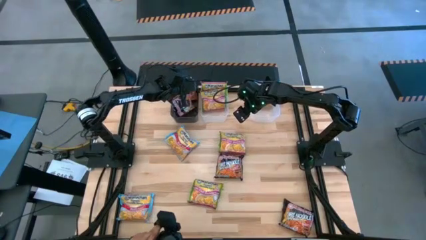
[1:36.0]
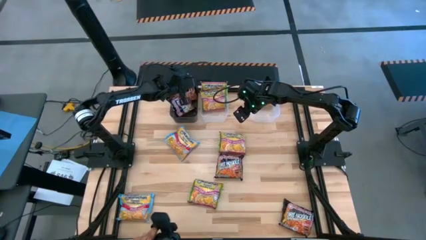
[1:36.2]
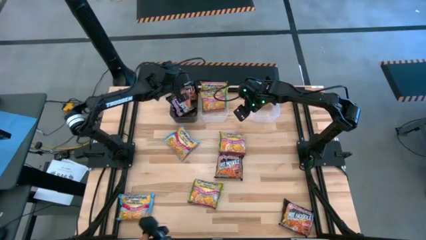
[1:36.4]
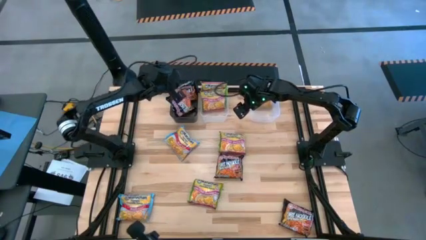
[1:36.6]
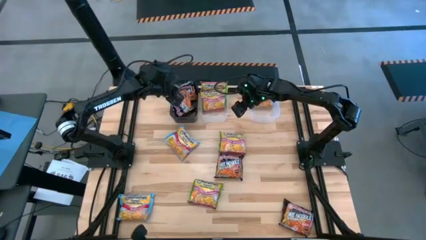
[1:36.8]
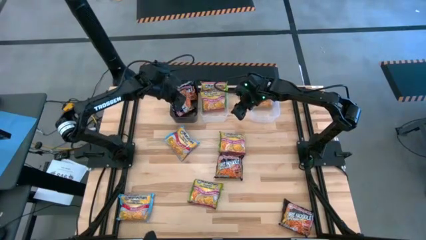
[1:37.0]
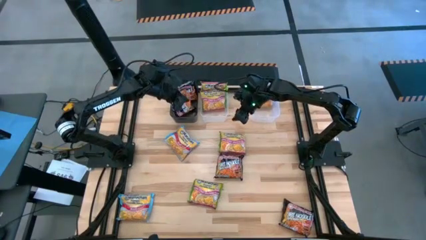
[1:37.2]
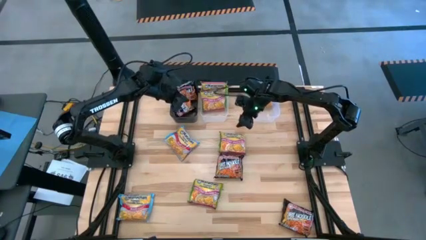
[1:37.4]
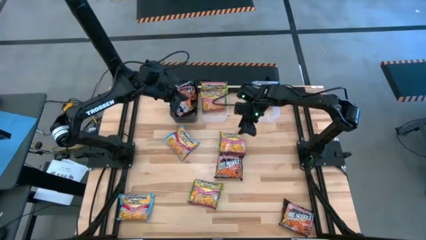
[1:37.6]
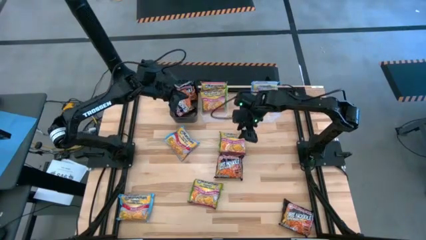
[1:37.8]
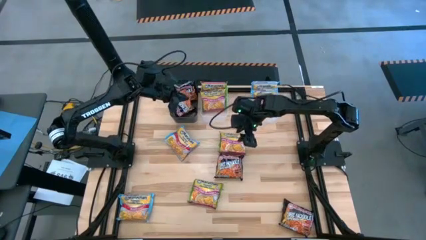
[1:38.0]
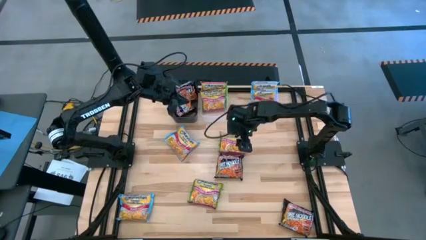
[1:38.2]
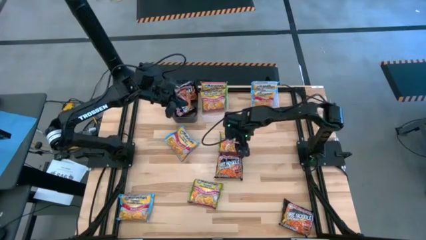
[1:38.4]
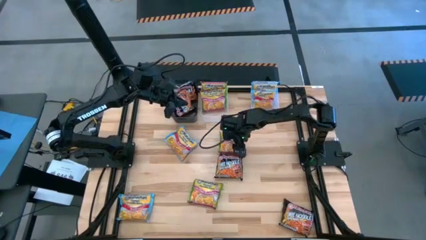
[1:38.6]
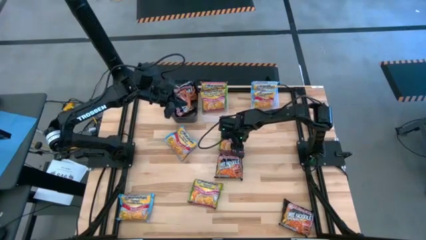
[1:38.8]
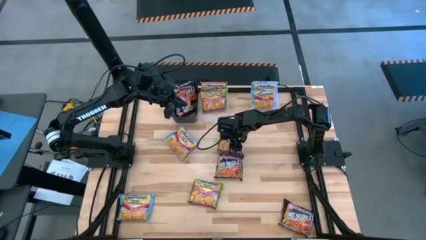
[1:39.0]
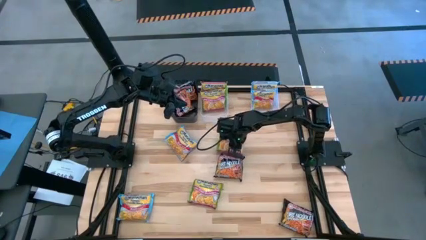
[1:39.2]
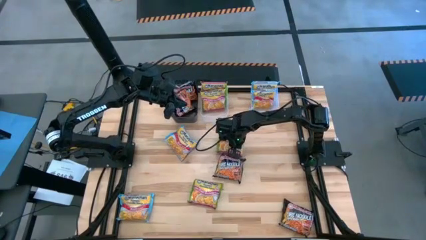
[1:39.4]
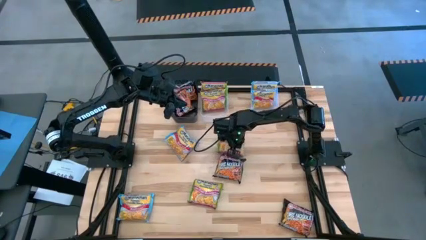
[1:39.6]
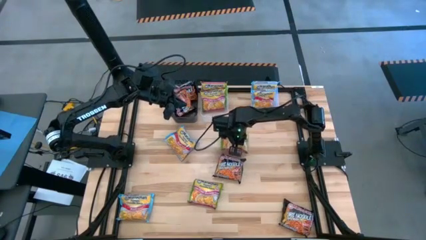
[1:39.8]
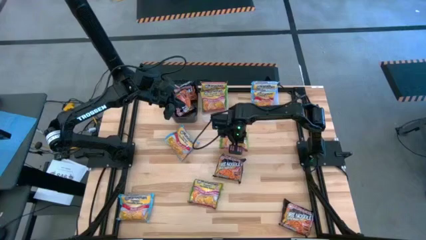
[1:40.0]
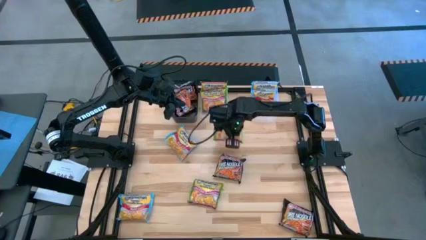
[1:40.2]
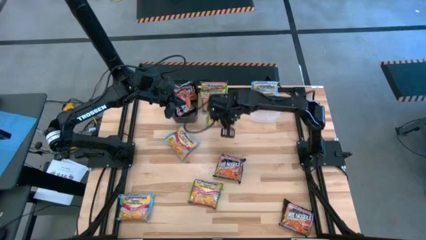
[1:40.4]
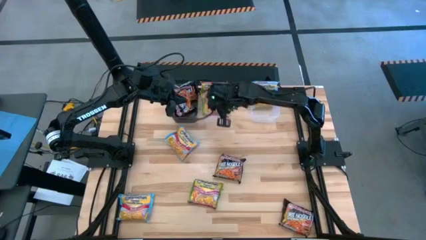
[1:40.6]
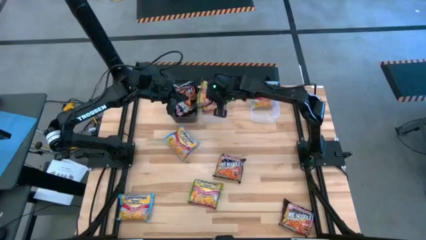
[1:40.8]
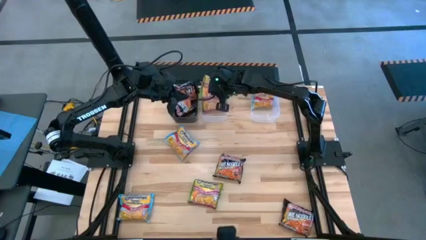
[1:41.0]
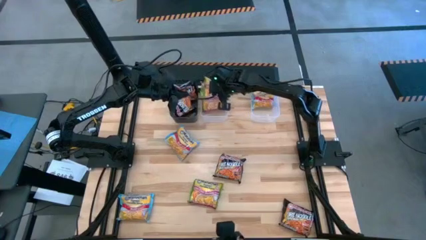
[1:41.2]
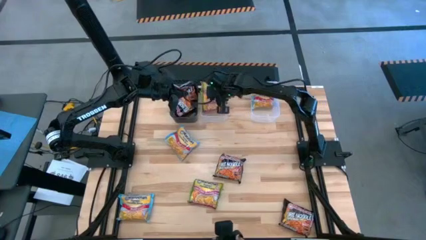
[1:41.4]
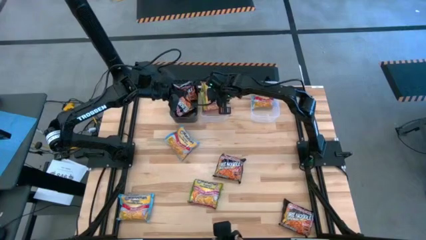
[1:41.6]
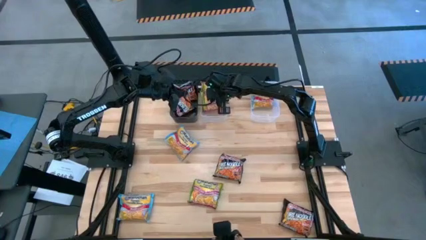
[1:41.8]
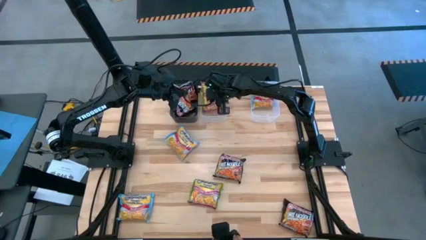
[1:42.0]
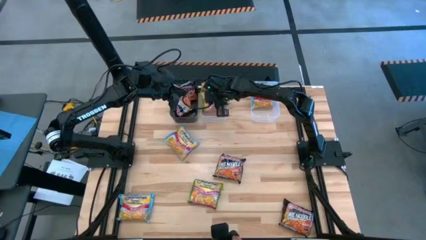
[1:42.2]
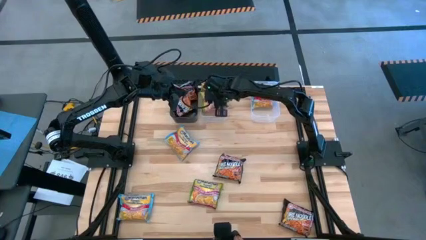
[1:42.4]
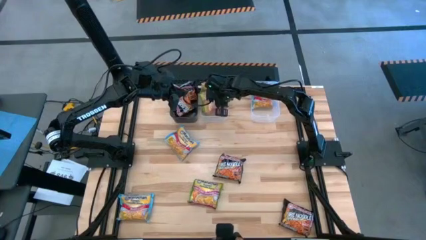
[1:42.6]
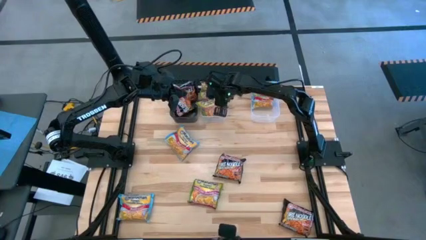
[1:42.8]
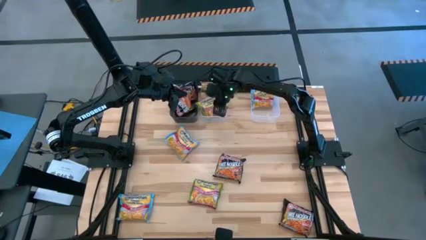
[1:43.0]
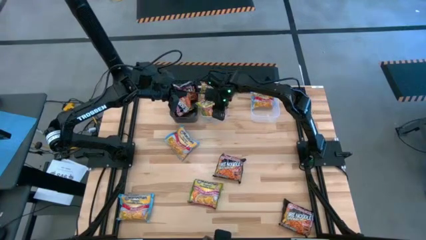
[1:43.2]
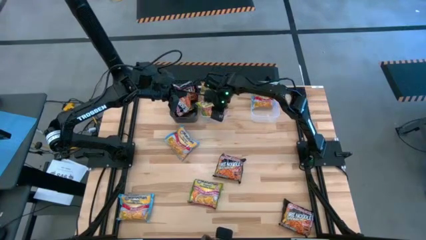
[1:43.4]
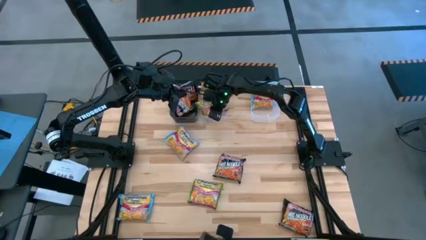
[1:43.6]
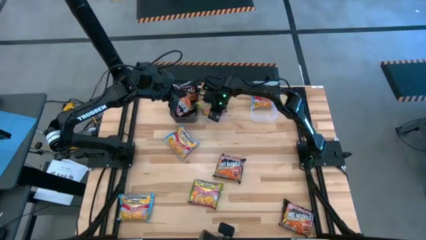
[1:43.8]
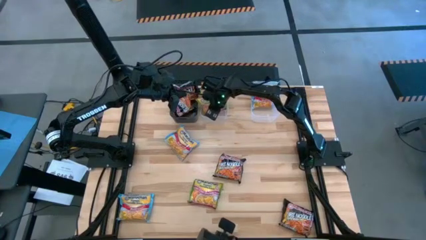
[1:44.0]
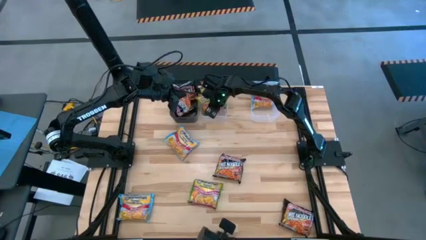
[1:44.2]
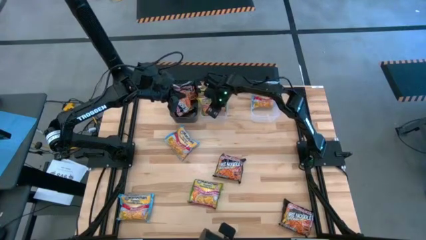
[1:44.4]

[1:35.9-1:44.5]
Task: Sort Maruchan noodles
Put the green noodle pack into the left transparent bin

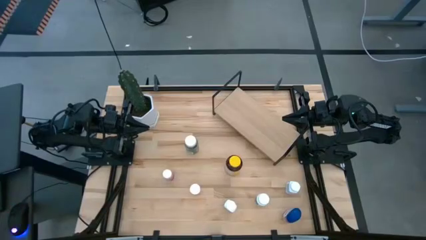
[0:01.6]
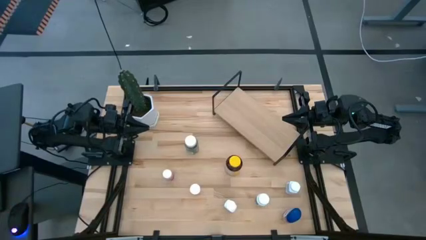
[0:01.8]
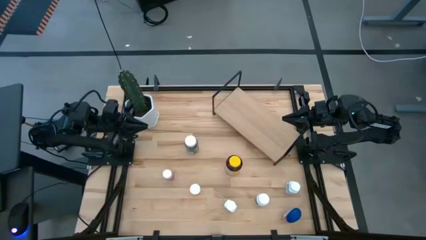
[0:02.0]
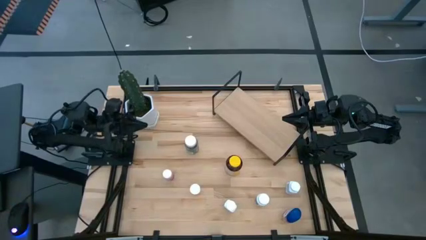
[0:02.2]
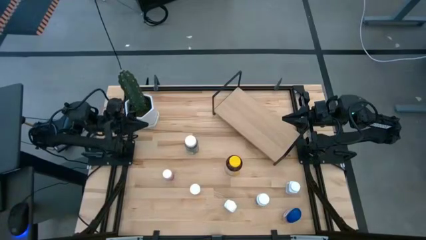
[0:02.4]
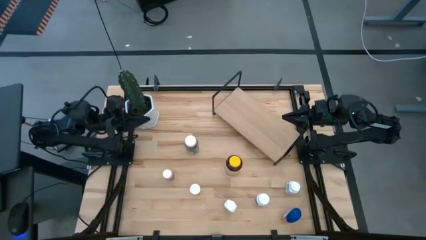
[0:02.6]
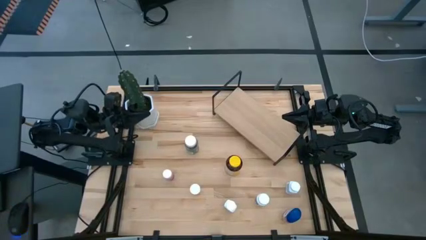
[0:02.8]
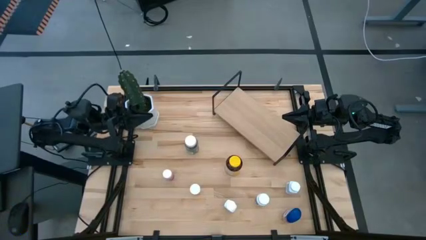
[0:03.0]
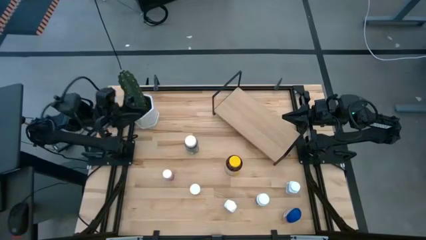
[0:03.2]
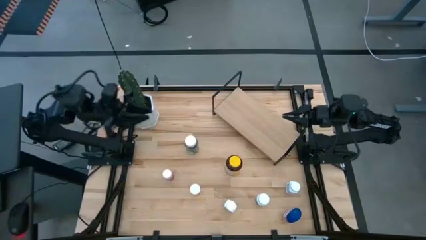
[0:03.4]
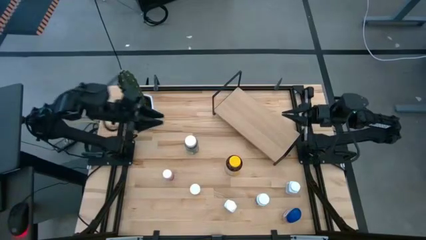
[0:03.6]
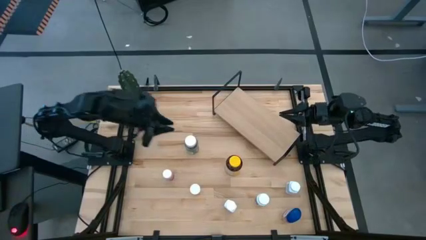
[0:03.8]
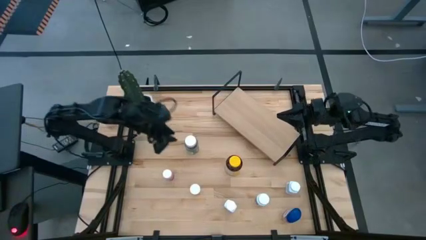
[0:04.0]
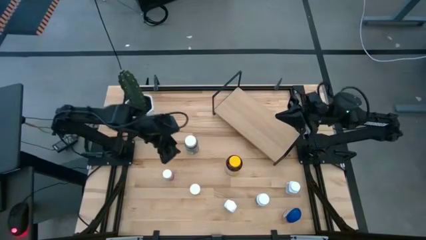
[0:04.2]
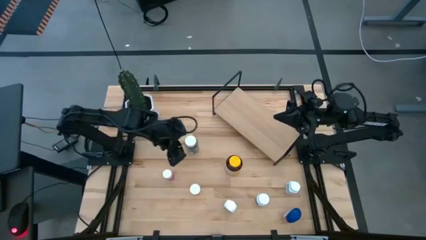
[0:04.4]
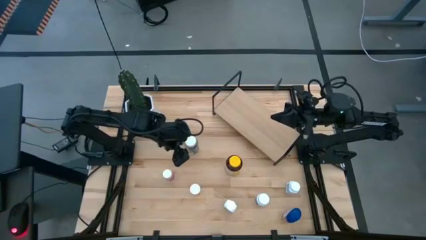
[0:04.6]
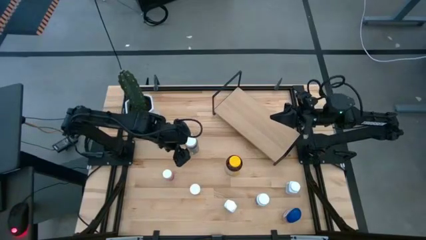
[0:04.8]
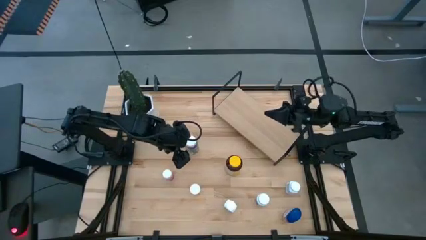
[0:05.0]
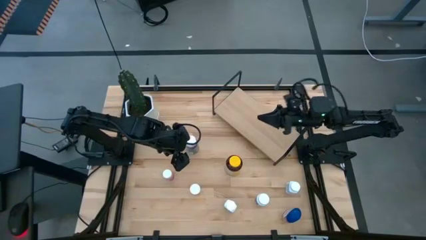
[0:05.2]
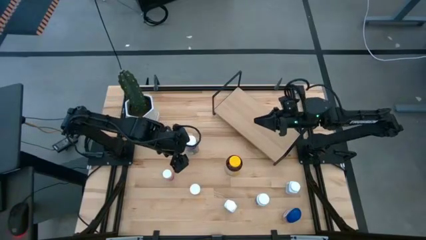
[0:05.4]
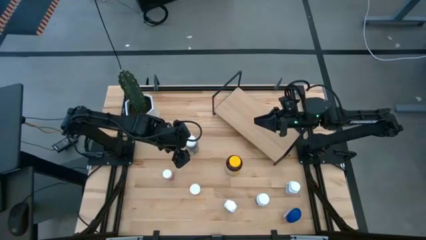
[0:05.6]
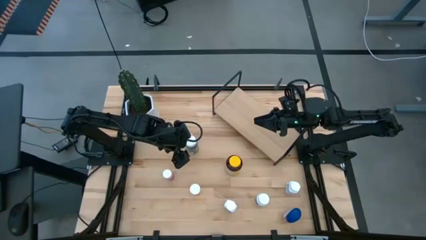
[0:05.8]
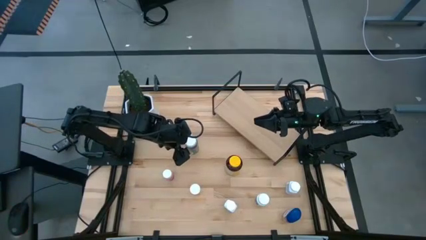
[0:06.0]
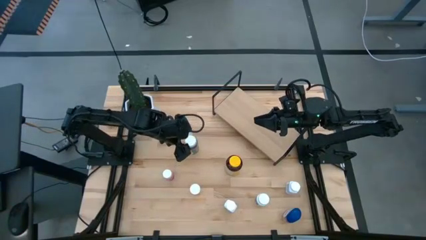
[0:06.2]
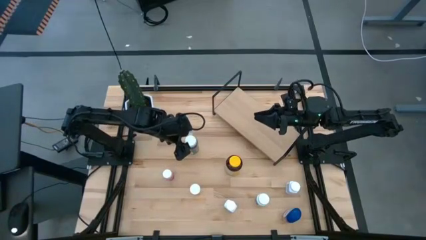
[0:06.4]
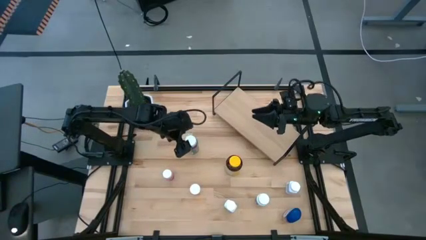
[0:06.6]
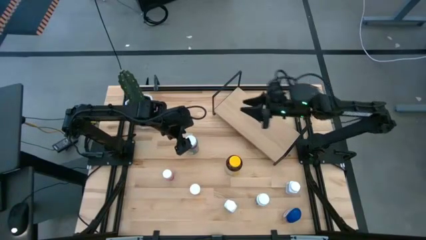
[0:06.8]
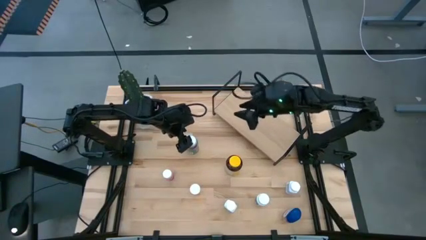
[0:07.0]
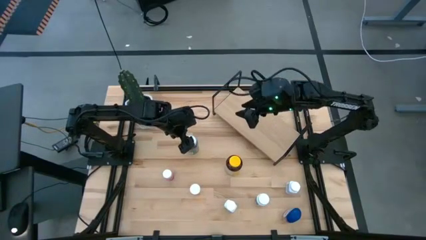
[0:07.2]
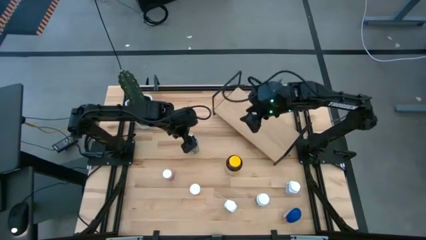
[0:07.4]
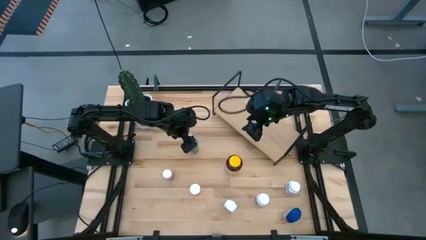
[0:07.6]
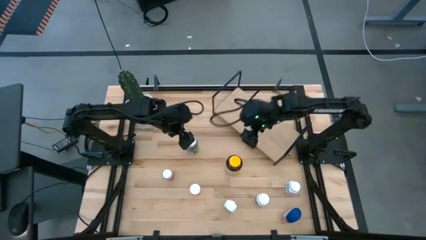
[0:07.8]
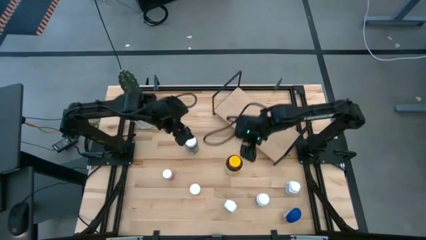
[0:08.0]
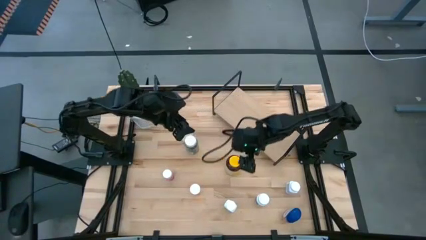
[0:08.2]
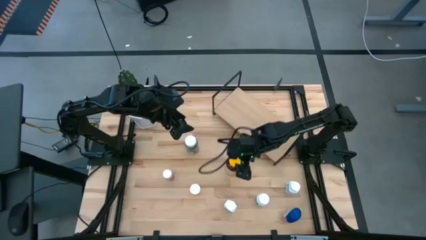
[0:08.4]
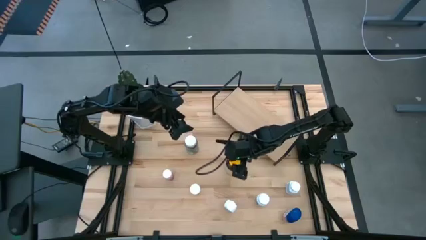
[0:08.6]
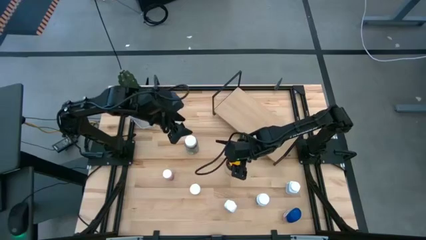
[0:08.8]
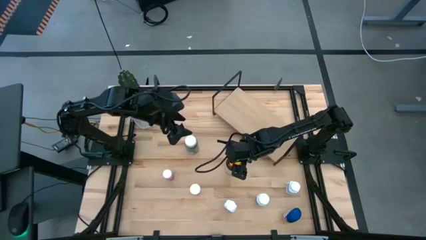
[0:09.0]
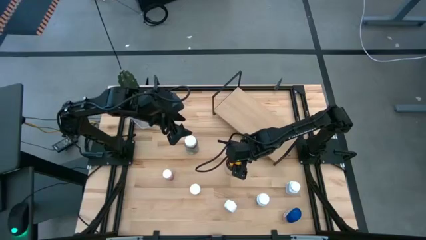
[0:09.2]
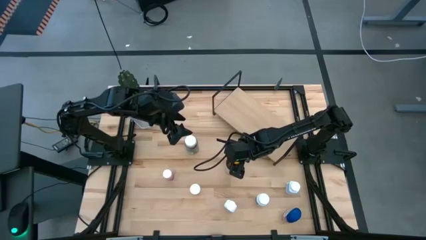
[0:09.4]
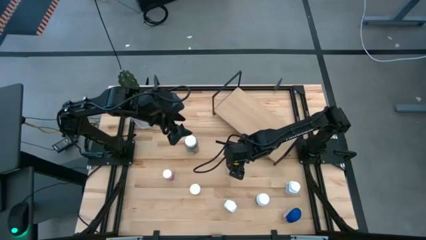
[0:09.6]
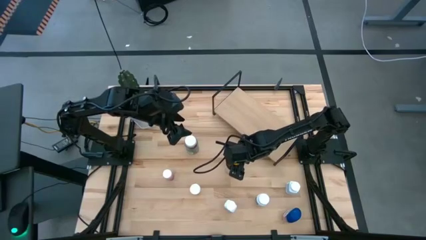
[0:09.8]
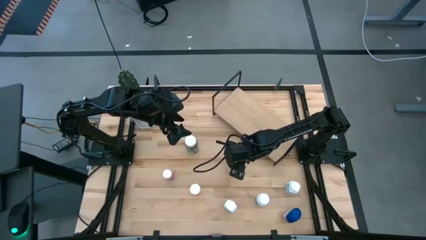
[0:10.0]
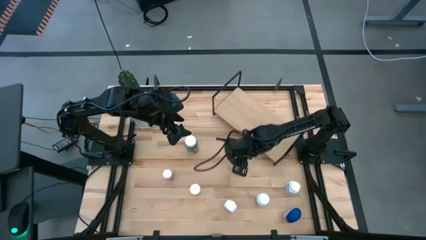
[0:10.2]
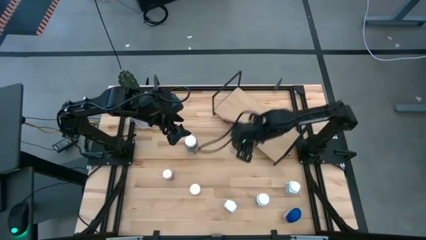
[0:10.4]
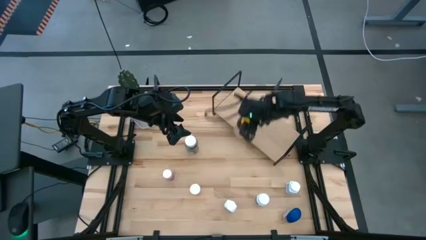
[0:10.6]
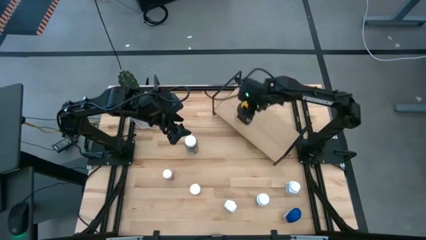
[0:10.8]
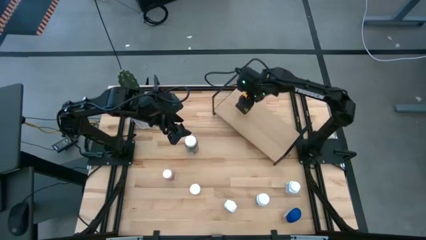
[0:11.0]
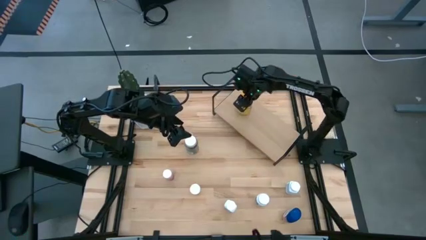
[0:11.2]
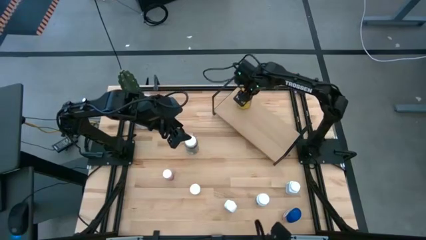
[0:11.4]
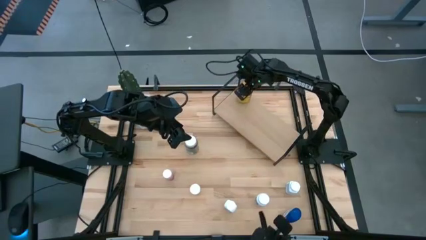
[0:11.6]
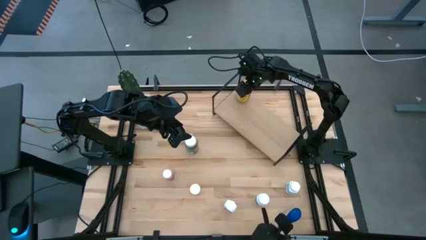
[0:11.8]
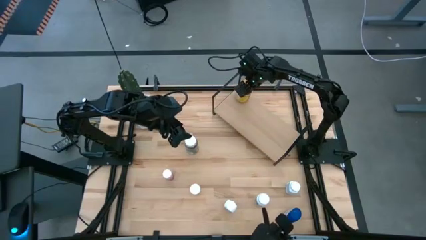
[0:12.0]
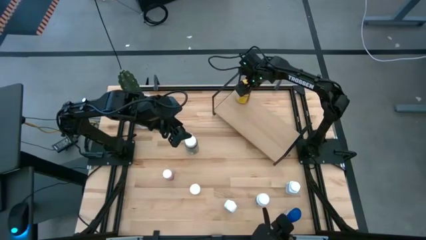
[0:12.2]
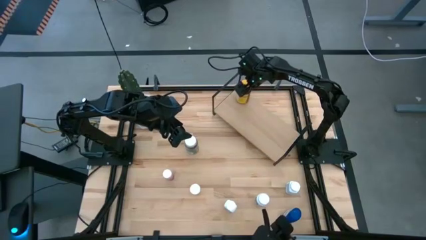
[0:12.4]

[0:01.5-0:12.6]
Task: Pick and place medicine bottles onto shelf by color
Put the large yellow medicine bottle on the shelf
